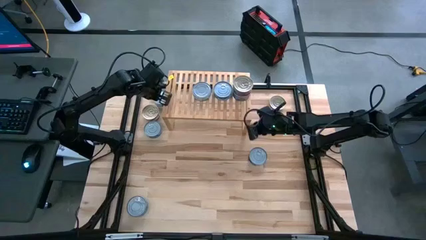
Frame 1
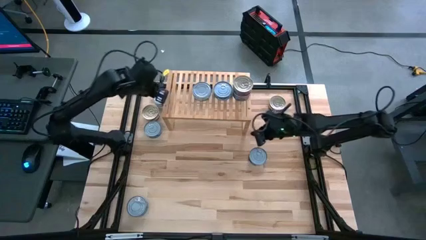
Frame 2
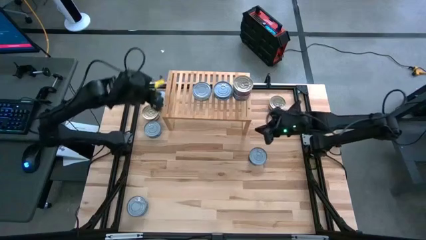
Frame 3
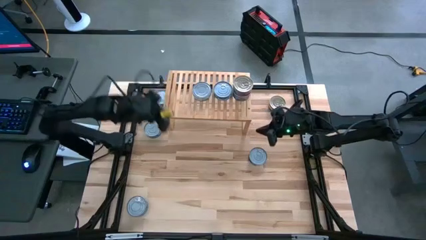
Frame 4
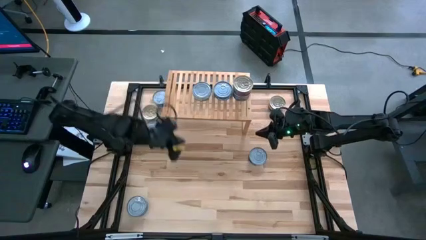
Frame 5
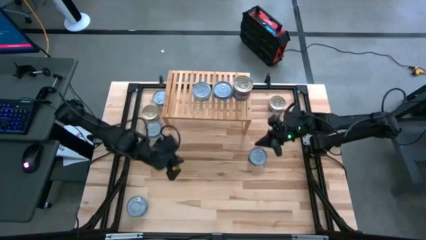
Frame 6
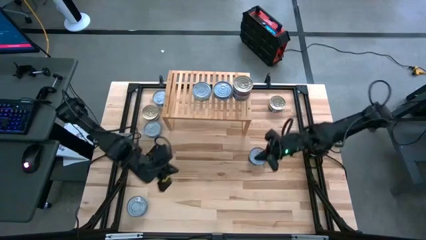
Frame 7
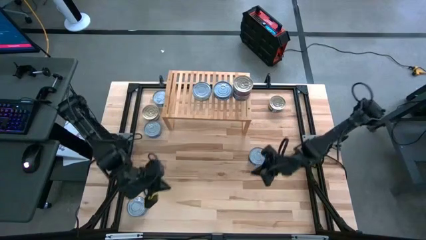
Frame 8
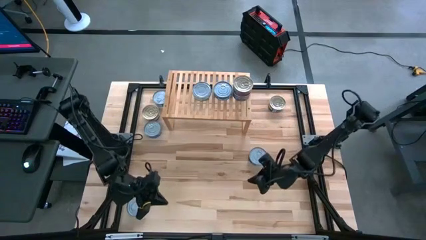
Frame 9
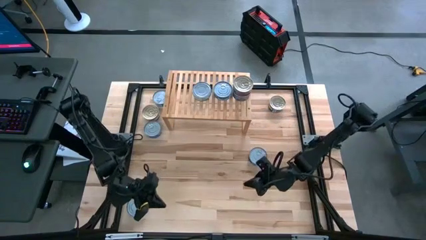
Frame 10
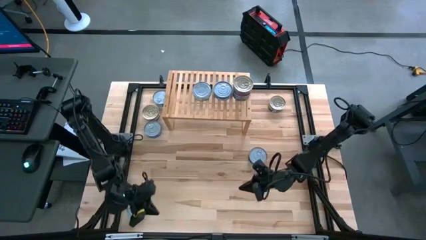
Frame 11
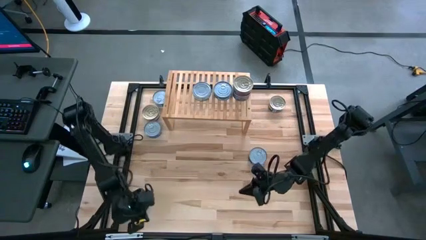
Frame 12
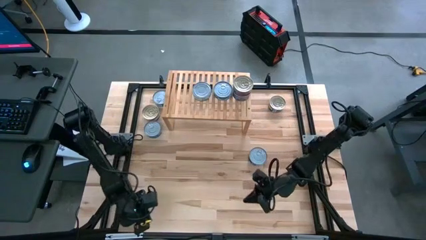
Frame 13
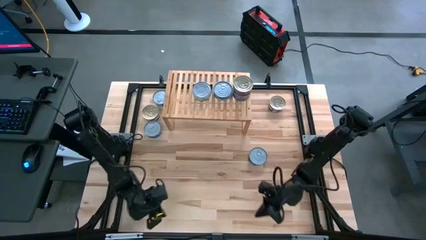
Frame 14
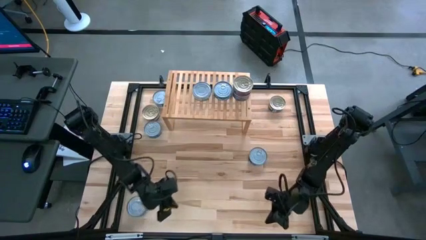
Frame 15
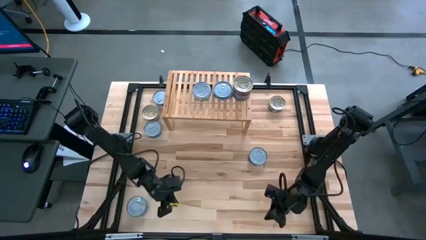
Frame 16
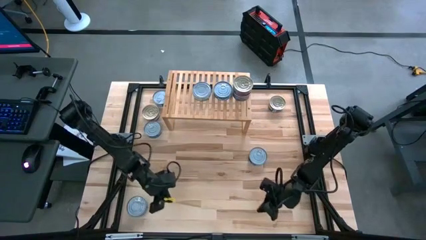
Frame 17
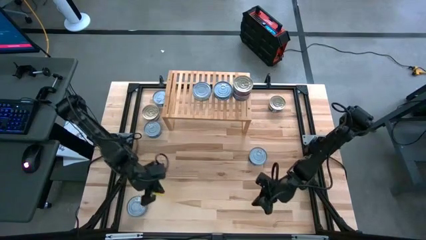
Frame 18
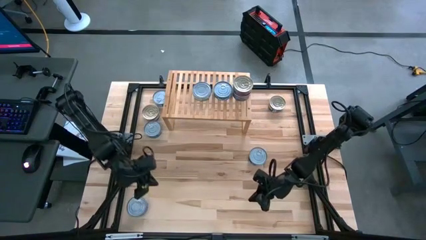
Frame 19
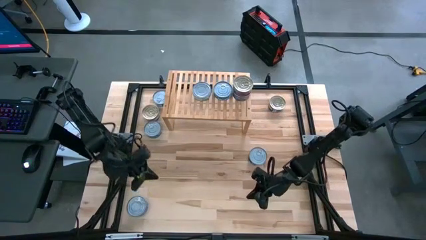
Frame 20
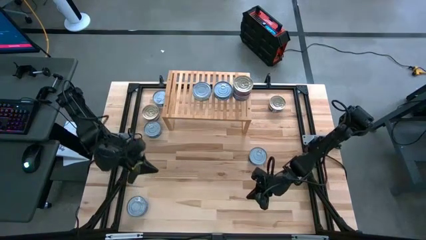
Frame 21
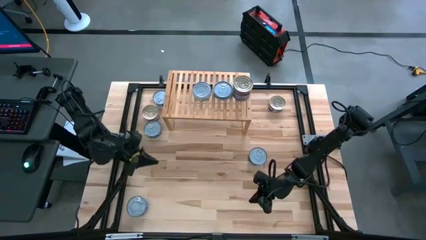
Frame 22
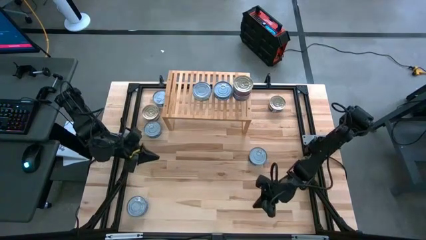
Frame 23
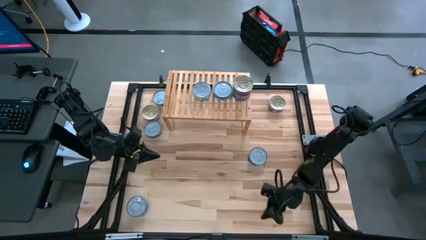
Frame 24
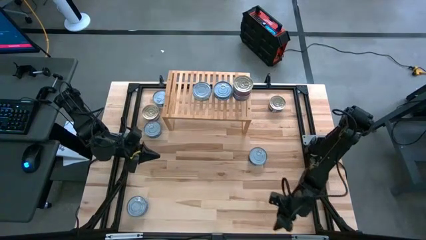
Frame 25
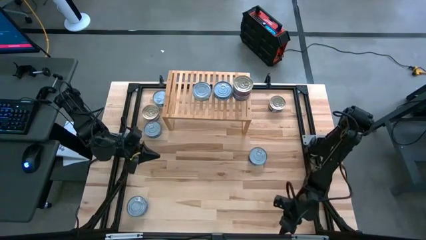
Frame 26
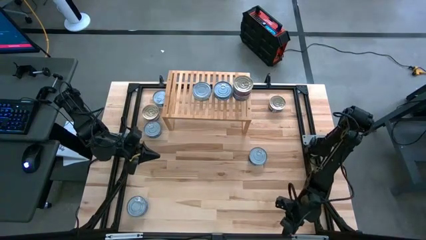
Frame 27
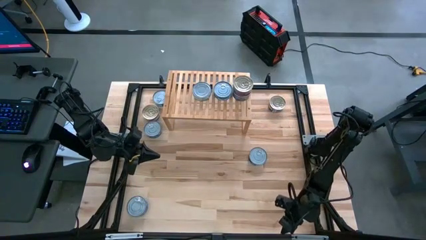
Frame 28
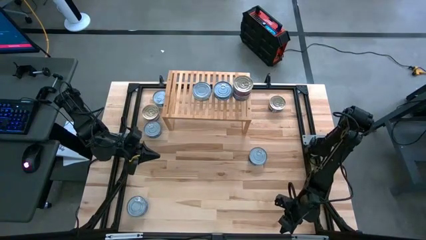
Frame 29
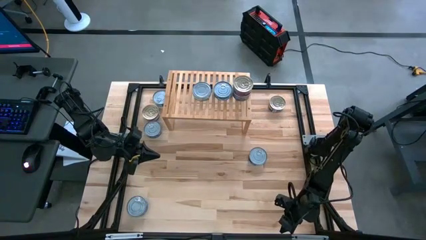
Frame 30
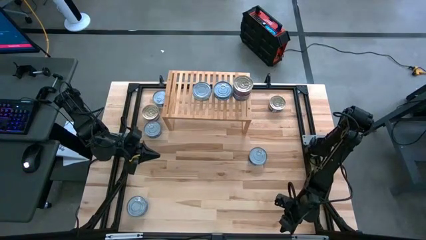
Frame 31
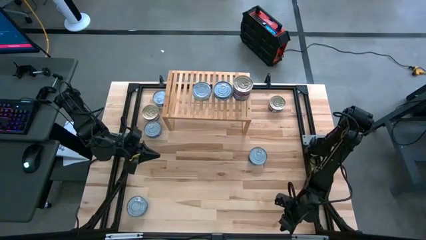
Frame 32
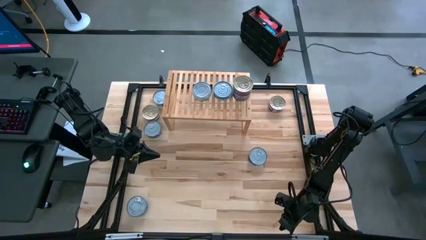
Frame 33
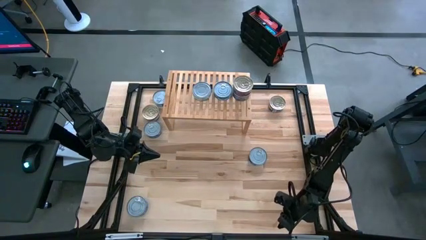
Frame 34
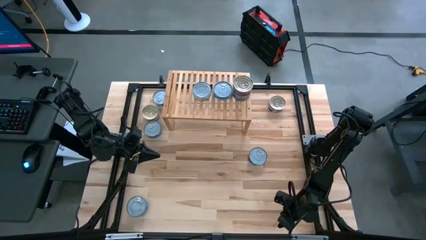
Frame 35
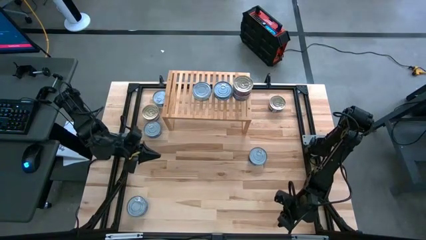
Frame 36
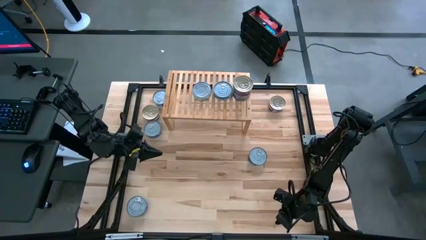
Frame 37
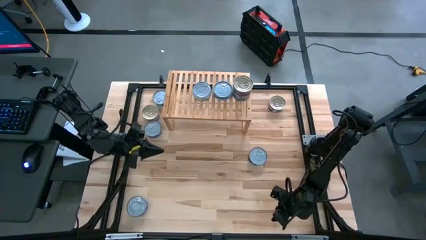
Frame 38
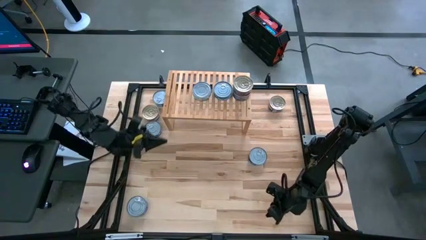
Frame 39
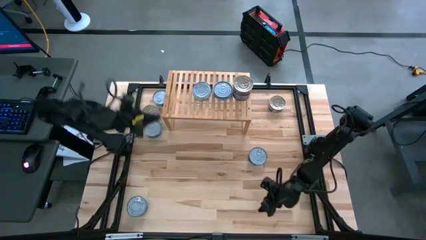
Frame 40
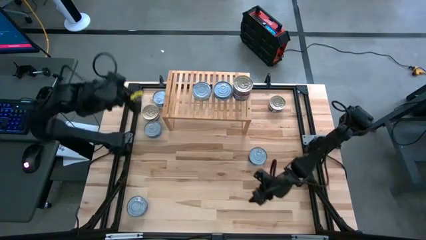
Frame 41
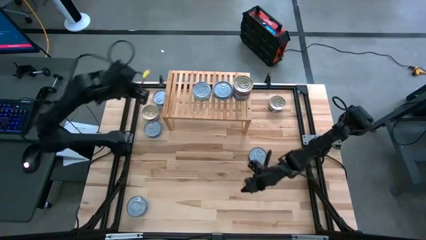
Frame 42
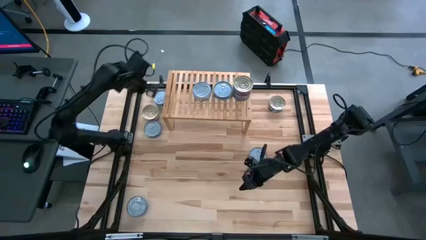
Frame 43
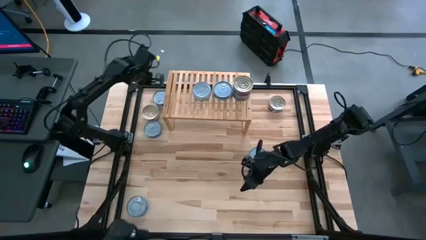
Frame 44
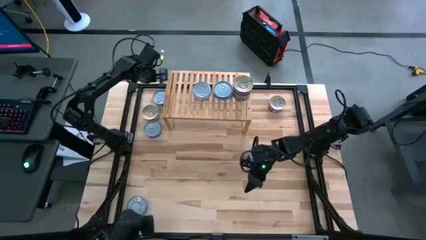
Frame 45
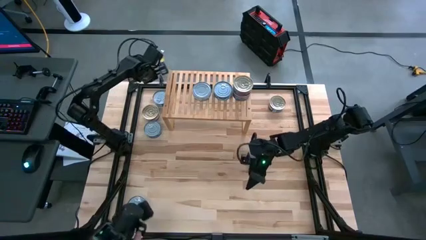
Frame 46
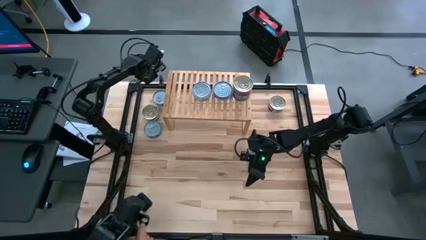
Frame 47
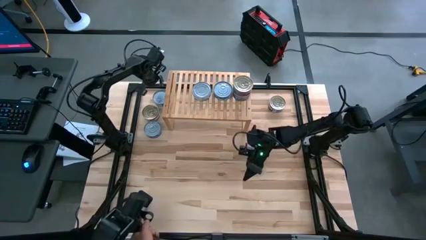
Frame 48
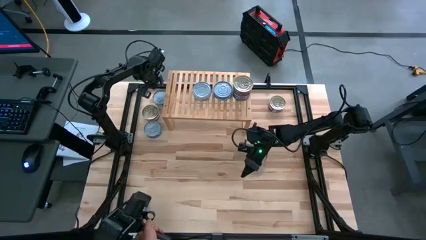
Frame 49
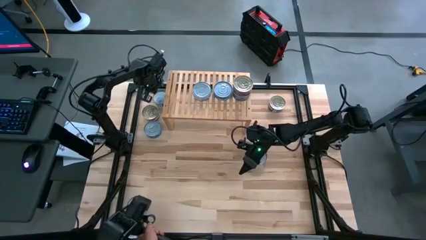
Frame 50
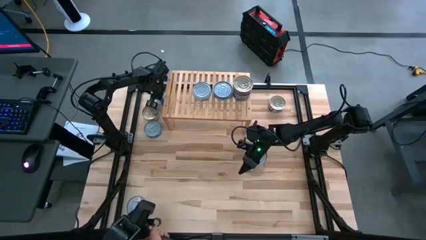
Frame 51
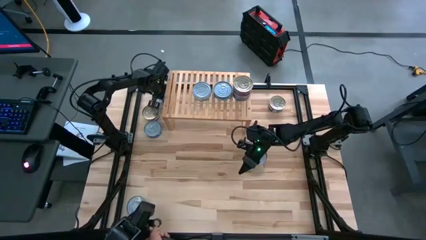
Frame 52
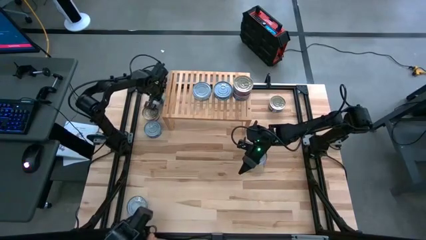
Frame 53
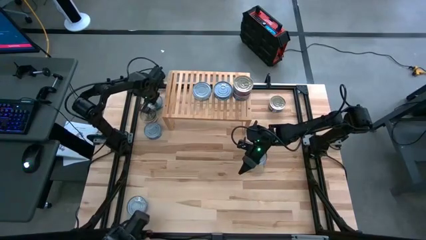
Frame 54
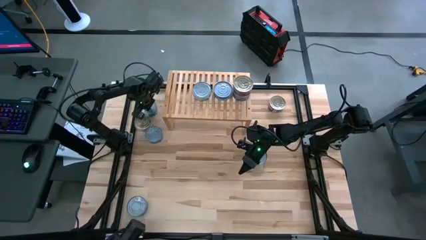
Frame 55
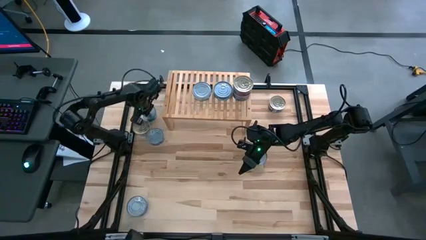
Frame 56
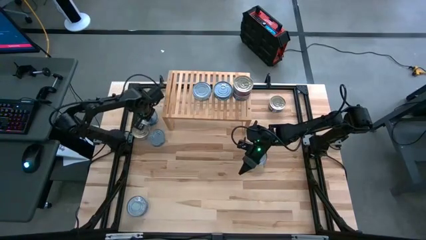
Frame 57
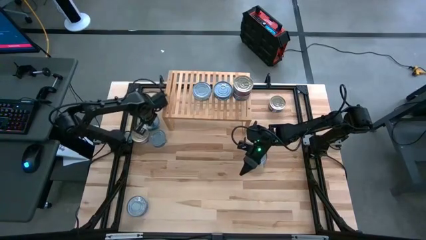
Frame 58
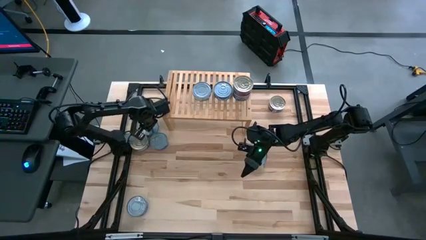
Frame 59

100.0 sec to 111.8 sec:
Task: Stack canned seafood by type on shelf
Stack the green and blue tuna can on top of the other green and blue tuna can on the shelf

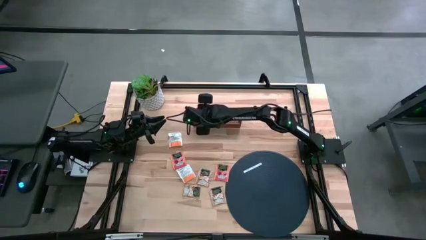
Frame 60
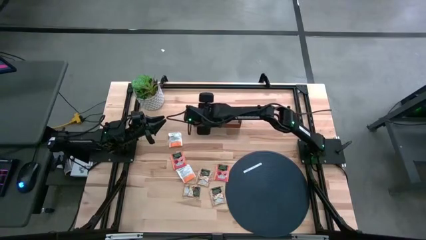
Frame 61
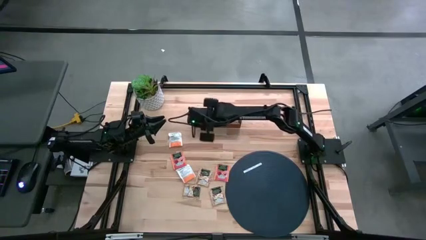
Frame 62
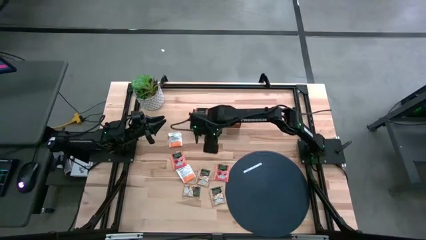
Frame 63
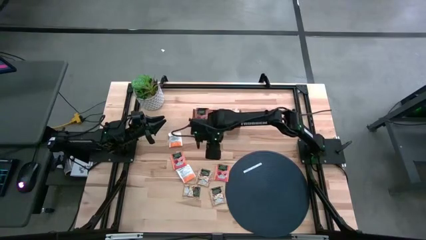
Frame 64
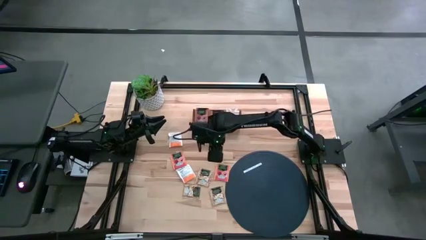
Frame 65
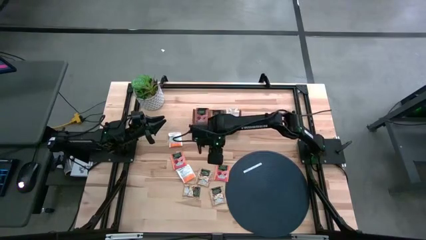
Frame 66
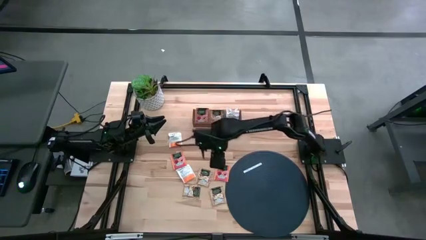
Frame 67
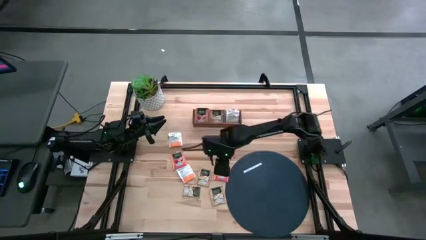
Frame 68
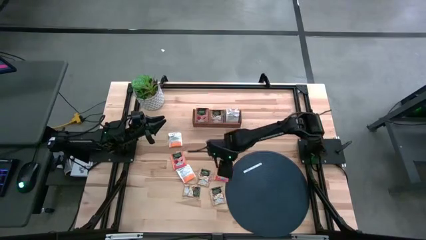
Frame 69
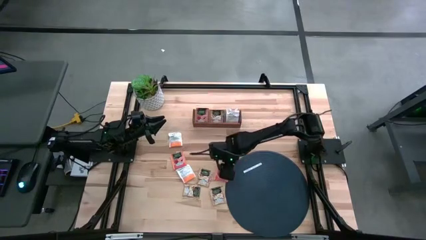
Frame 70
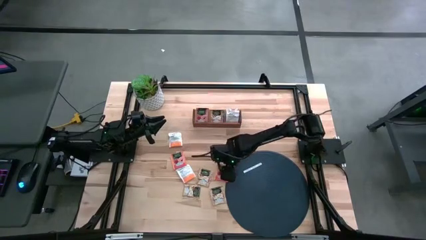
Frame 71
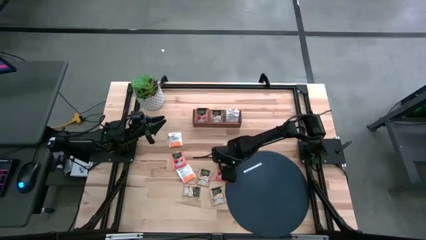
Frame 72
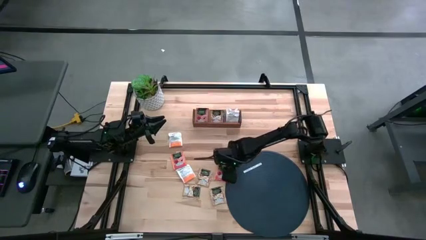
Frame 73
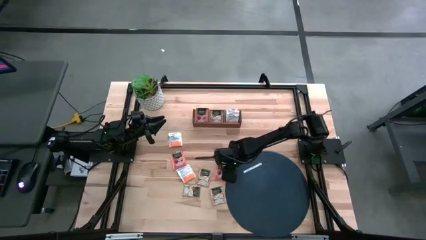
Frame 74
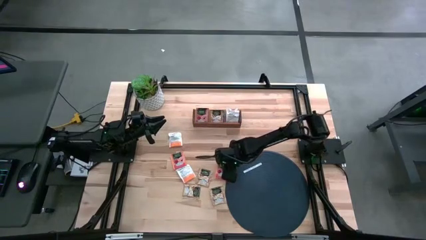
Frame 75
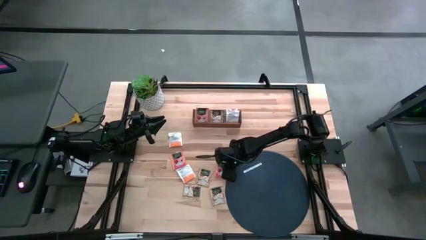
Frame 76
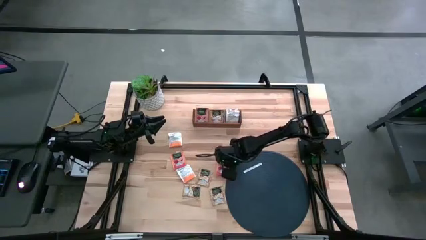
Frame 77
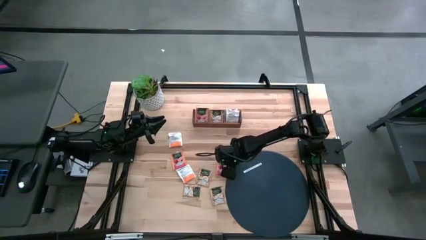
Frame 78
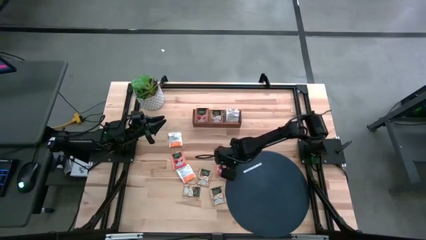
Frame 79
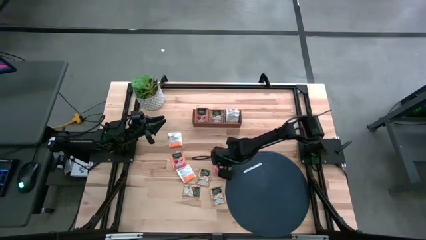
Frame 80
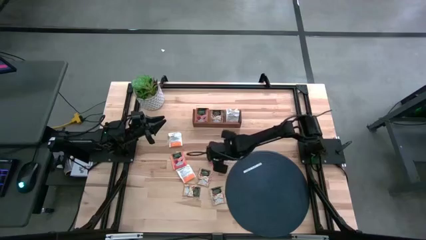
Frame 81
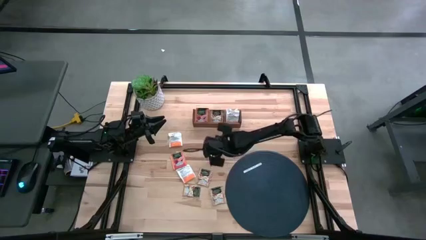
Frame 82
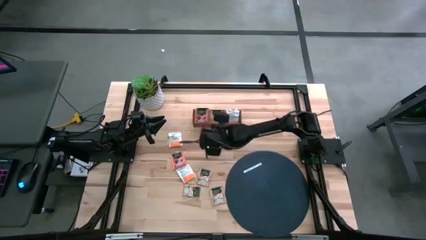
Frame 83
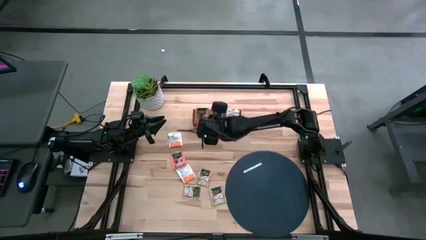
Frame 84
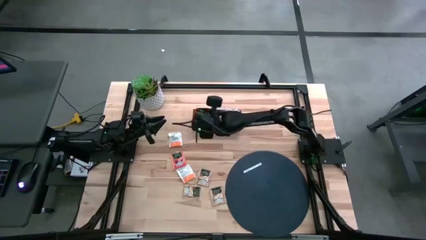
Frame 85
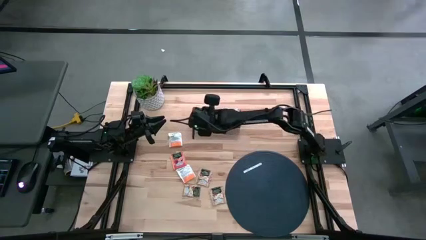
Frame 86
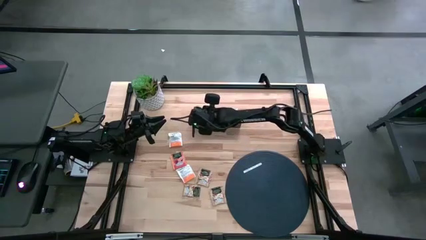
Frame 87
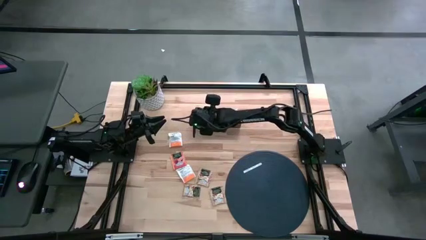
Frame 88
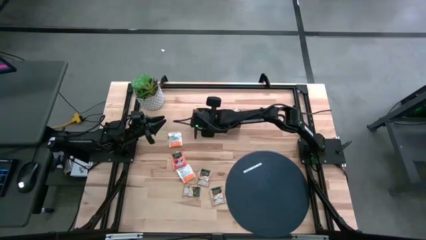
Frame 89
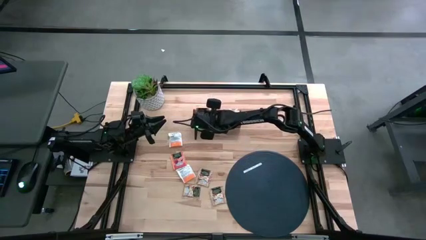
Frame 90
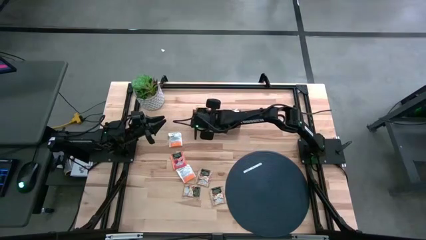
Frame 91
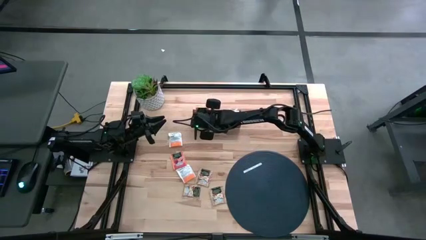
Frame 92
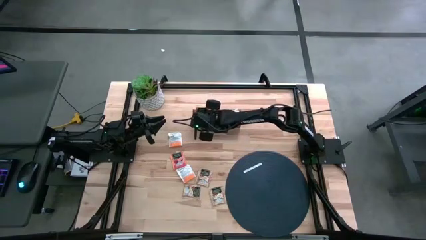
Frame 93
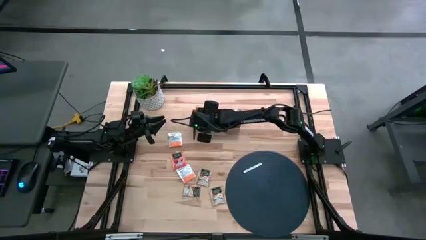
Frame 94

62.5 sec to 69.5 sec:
Task: Pick & Place Tea
Put the red orange tea sachet into the left section of the wooden organizer
